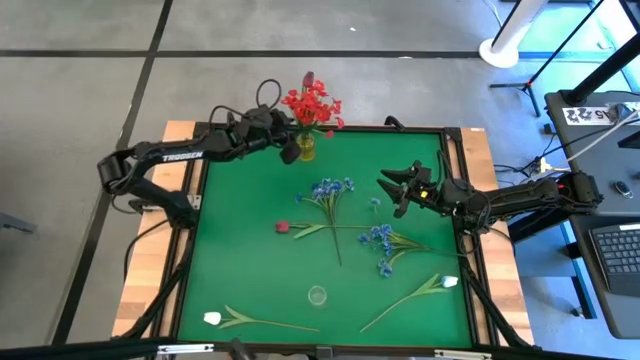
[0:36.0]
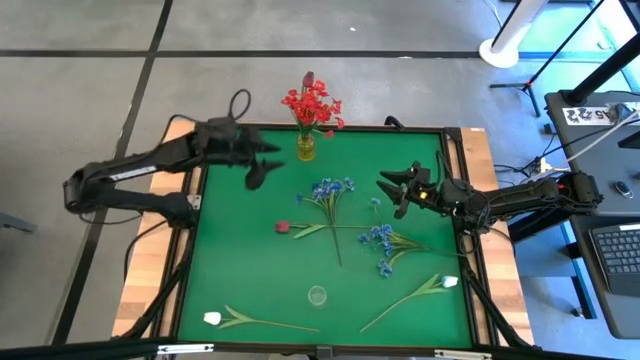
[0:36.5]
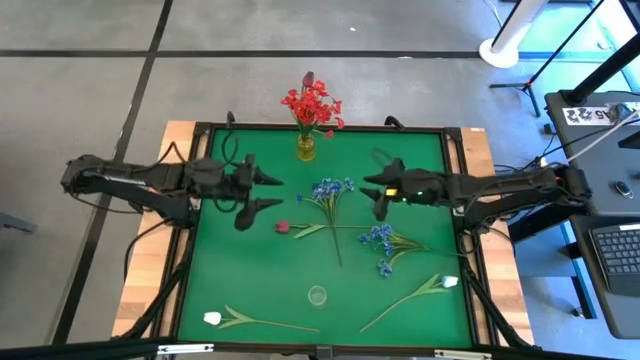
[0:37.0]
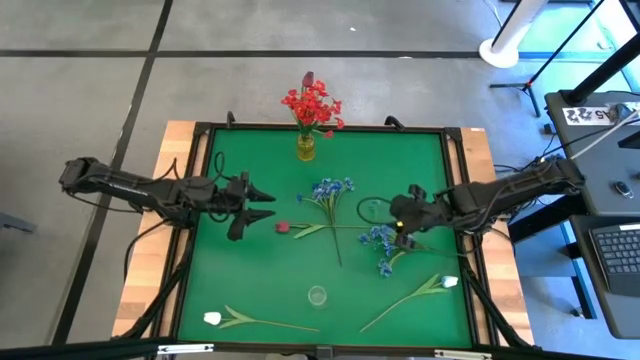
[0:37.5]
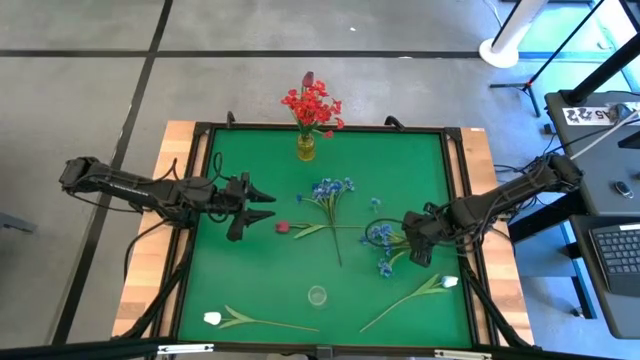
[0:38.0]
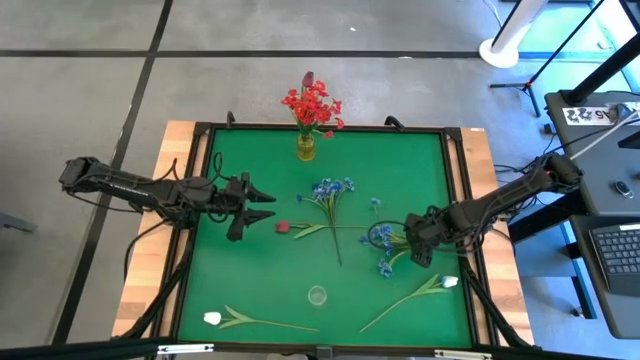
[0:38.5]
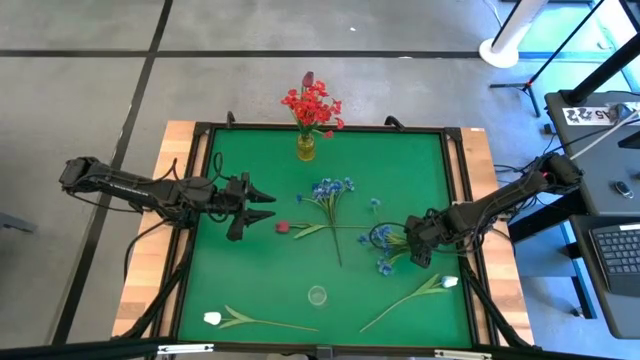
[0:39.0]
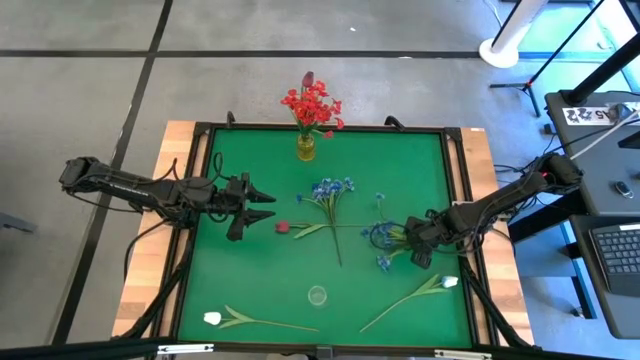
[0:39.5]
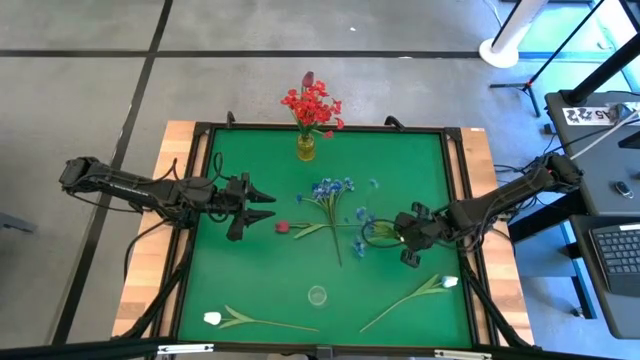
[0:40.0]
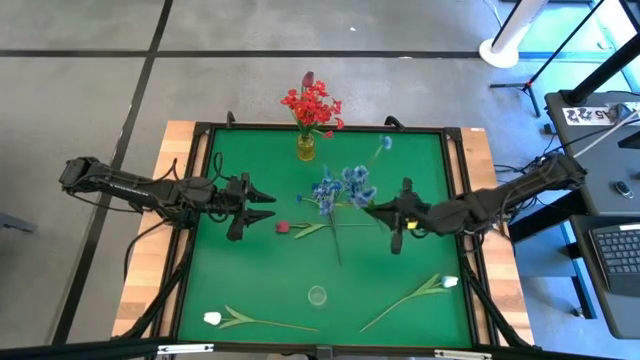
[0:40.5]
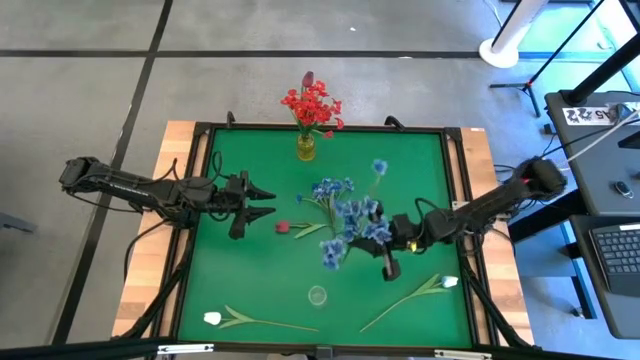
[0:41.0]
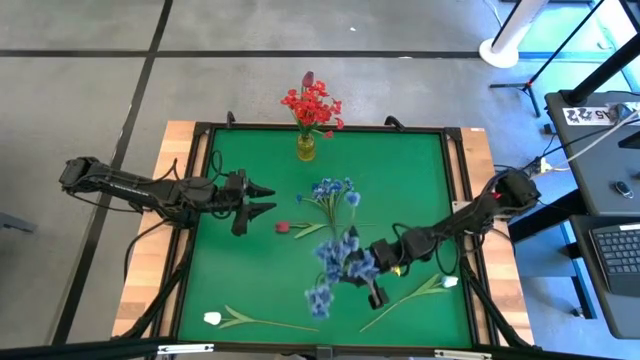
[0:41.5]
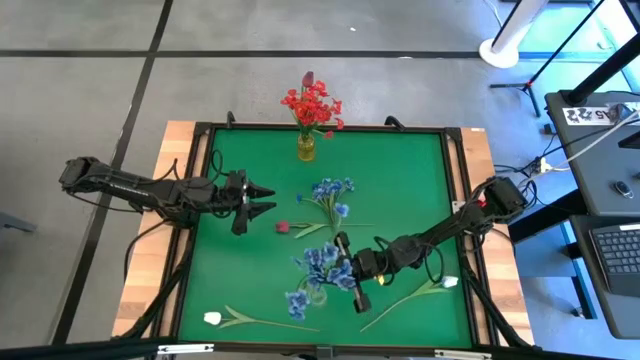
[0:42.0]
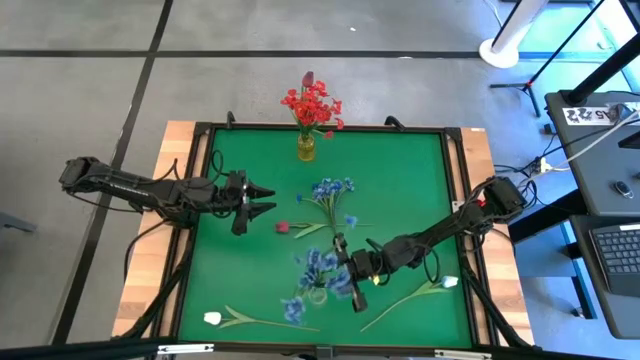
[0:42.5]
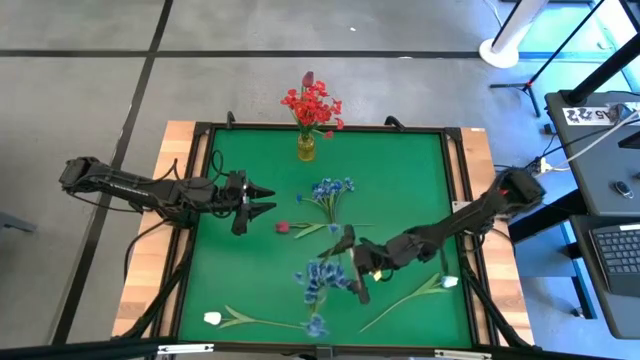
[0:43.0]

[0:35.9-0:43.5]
Task: Sort flowers into vase by color
Put the right blue flowers into the transparent vase

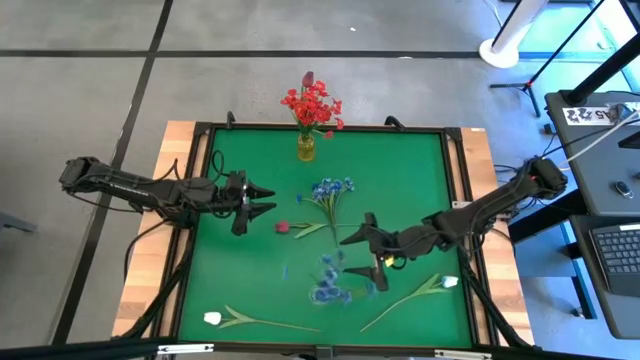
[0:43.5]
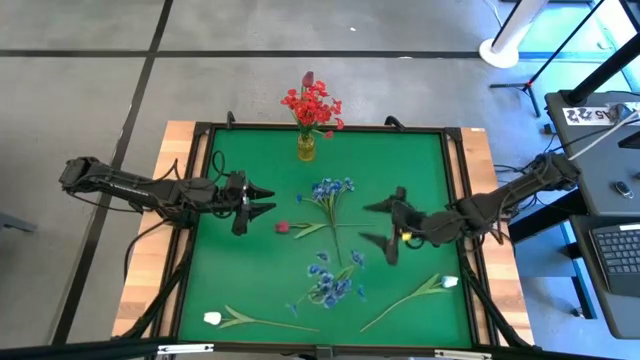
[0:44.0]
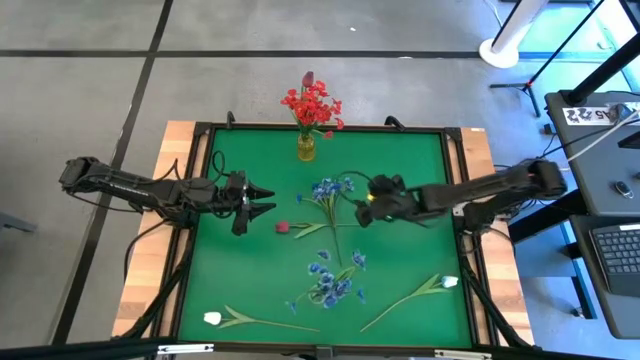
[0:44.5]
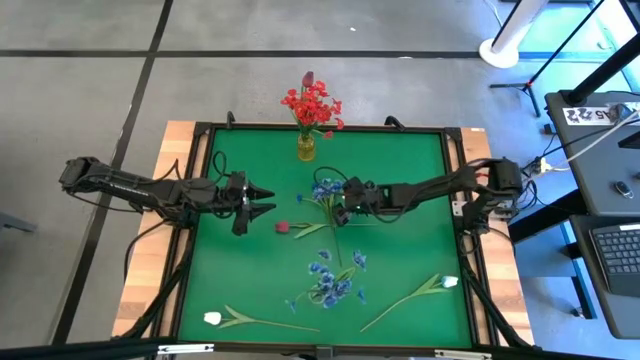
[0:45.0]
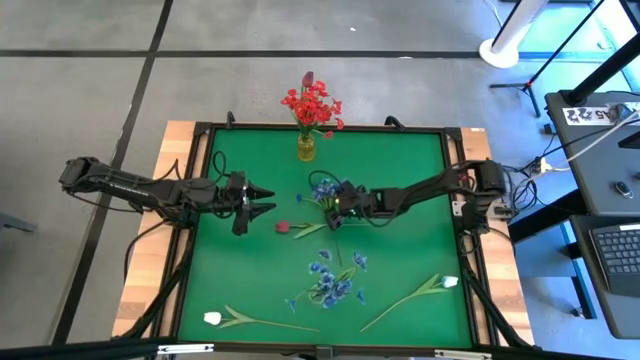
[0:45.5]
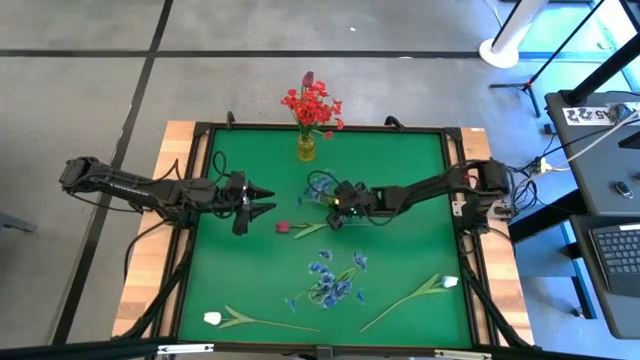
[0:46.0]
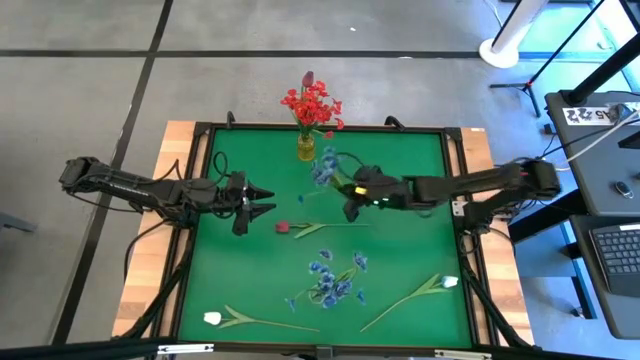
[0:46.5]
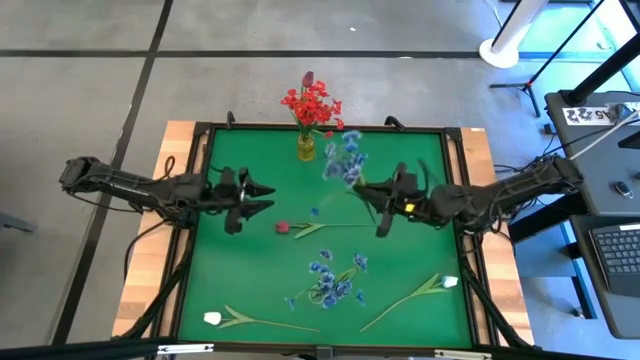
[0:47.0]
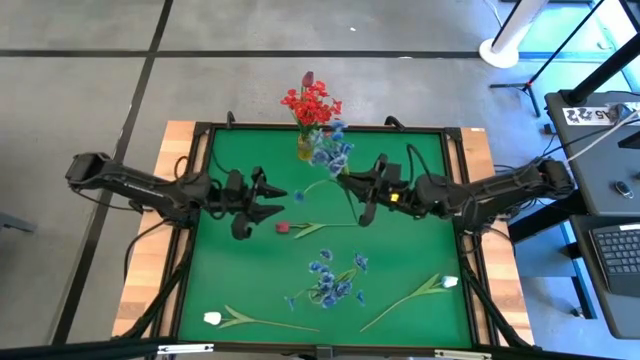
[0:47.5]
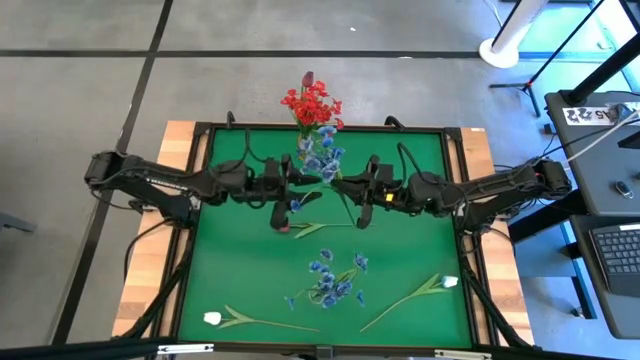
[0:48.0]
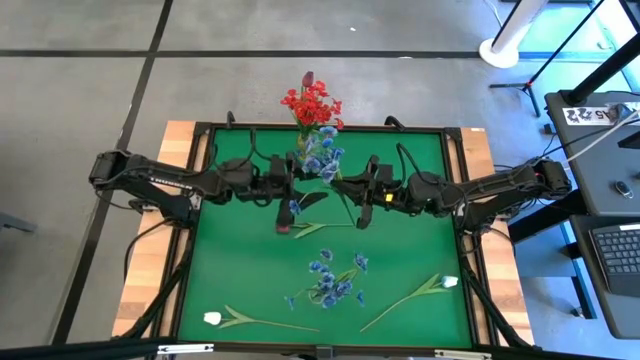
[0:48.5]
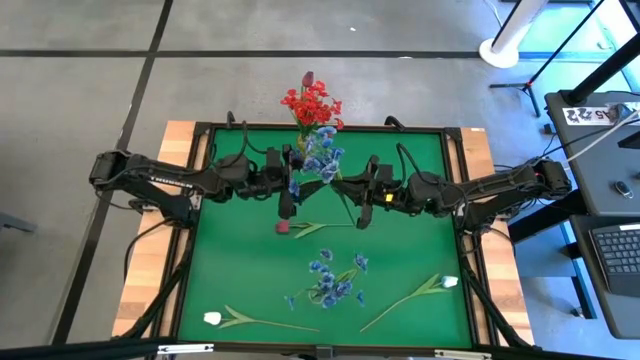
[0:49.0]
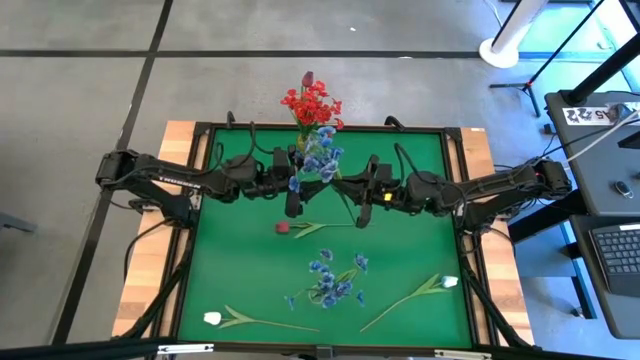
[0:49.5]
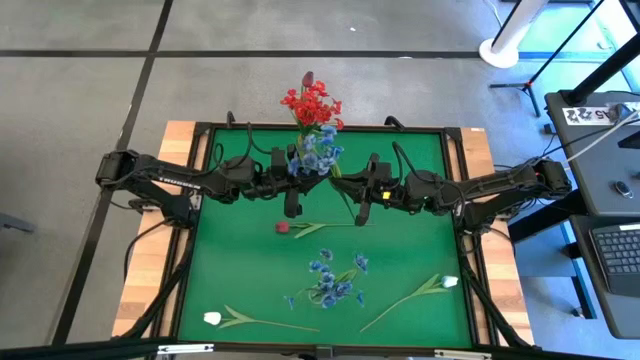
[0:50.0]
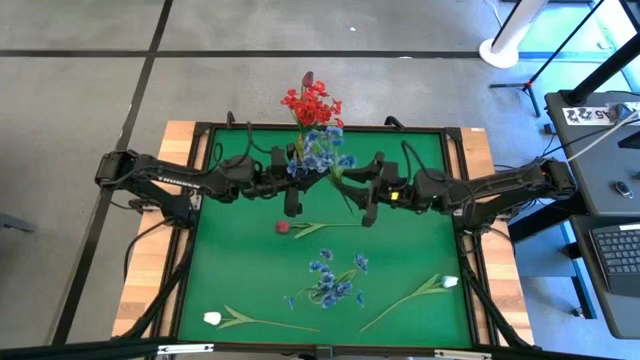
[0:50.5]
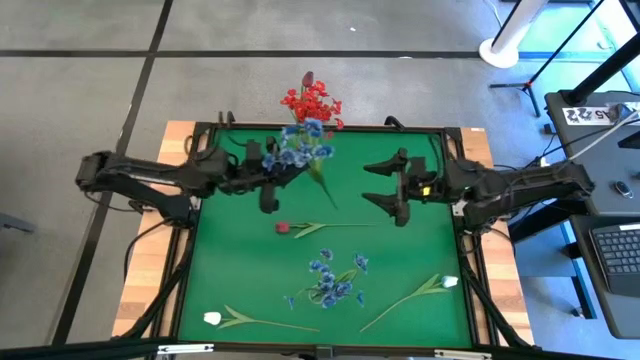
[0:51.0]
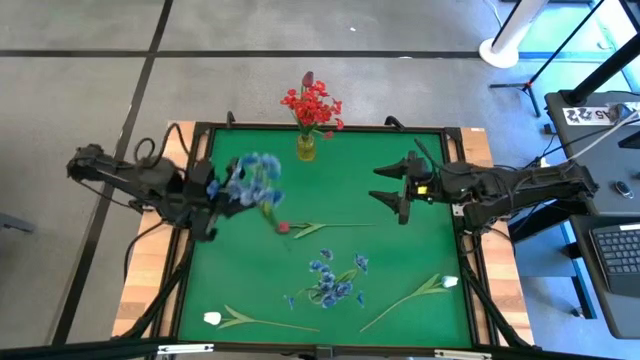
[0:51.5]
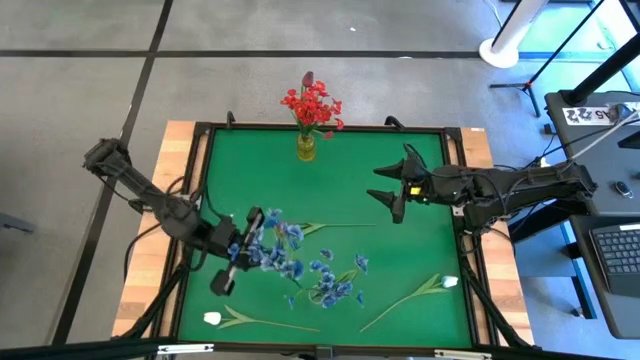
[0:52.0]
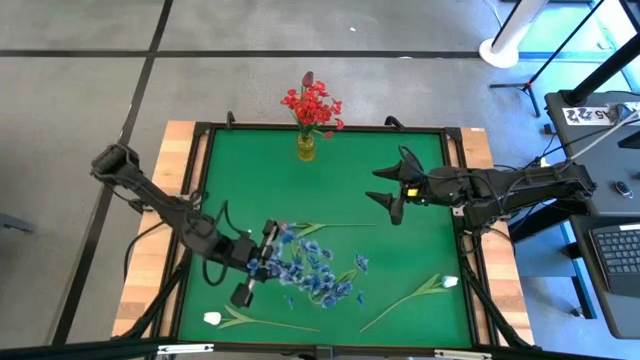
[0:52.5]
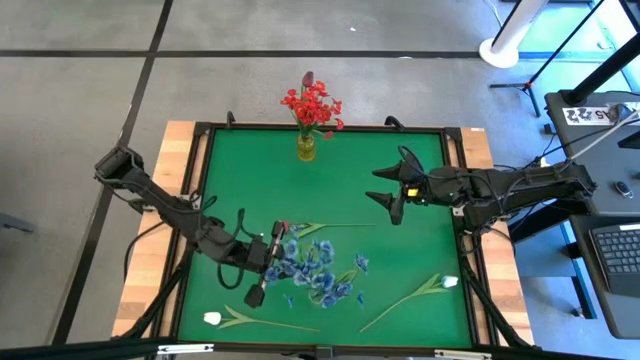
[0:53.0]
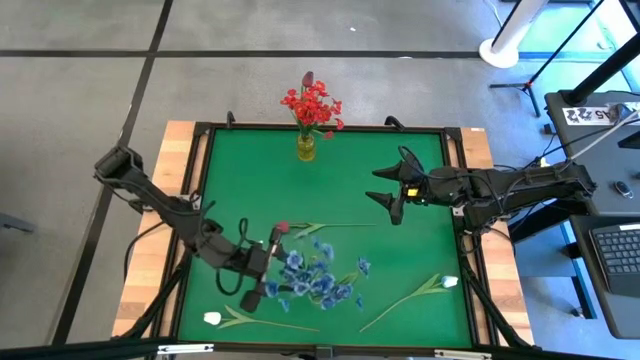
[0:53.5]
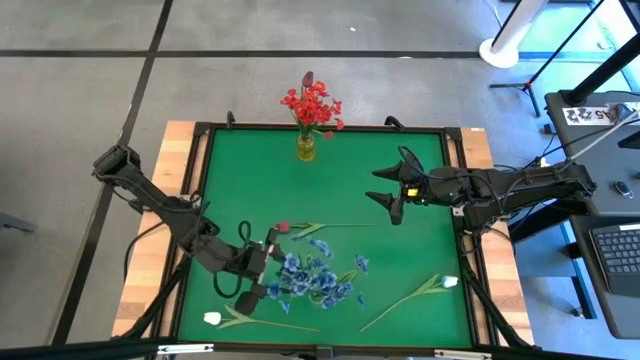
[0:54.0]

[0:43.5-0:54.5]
Put the blue flowers into the transparent vase
